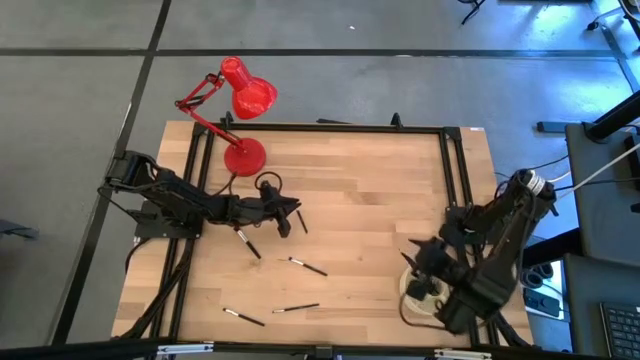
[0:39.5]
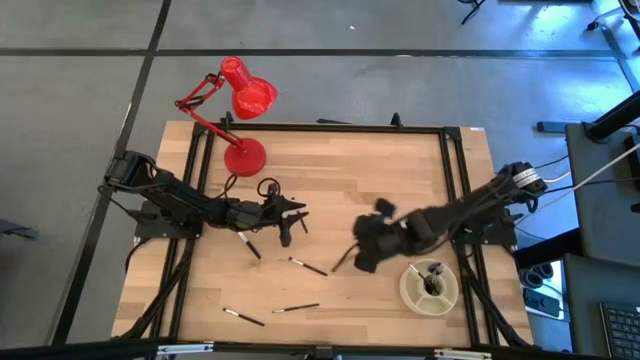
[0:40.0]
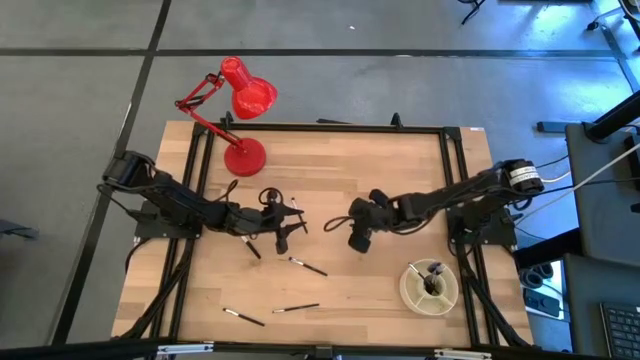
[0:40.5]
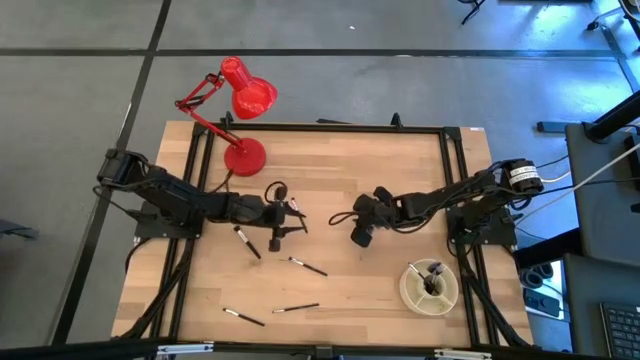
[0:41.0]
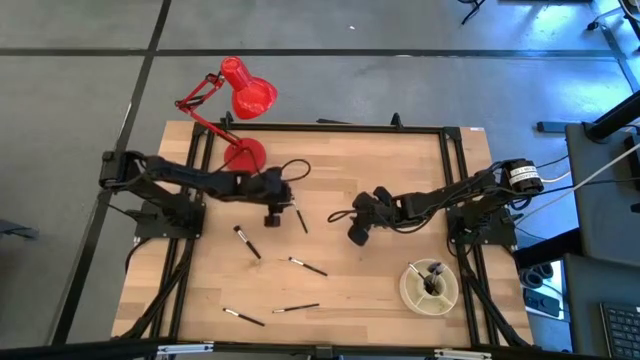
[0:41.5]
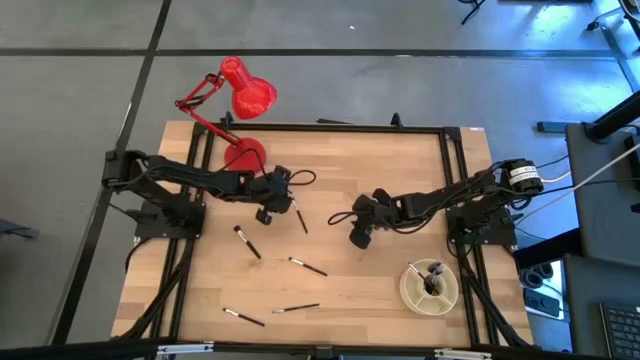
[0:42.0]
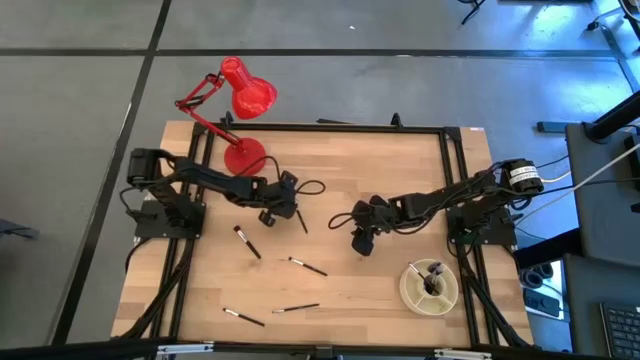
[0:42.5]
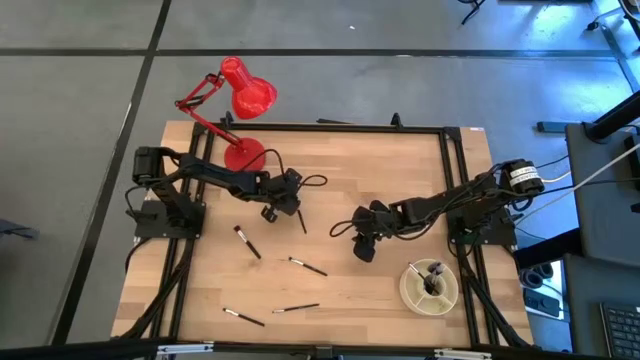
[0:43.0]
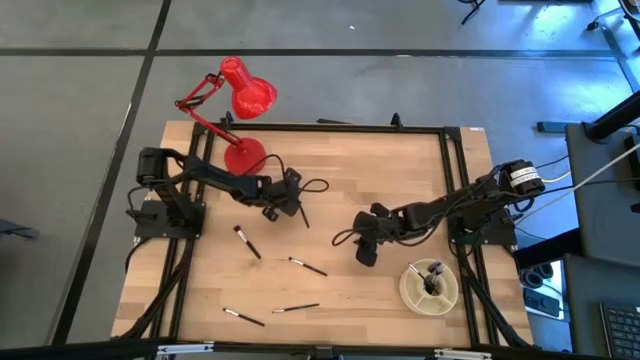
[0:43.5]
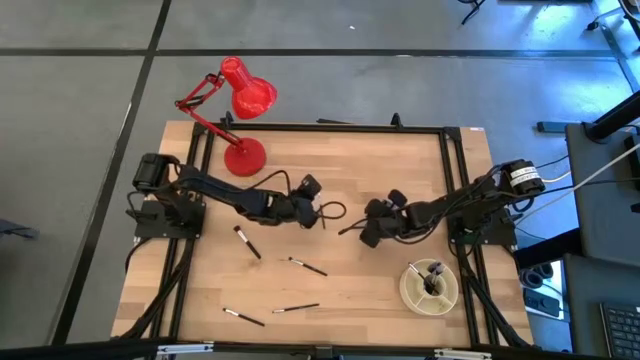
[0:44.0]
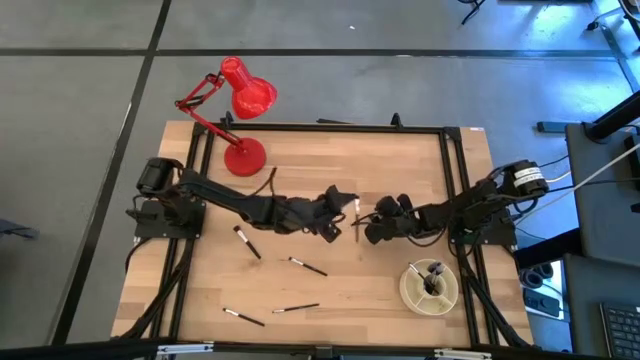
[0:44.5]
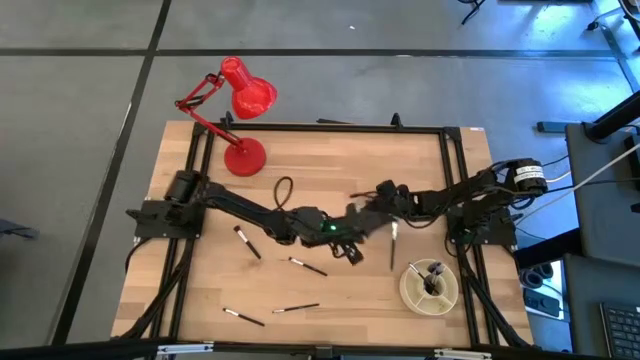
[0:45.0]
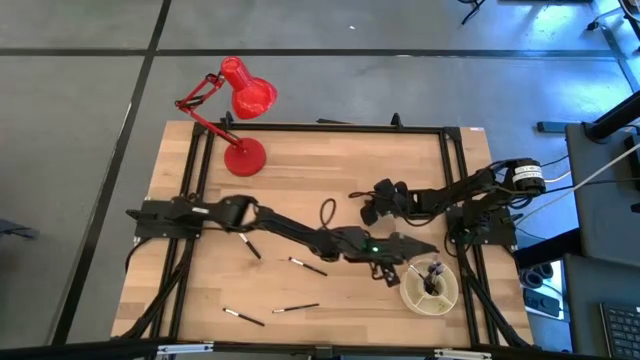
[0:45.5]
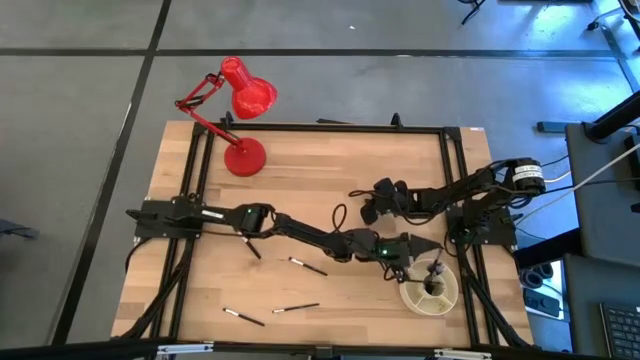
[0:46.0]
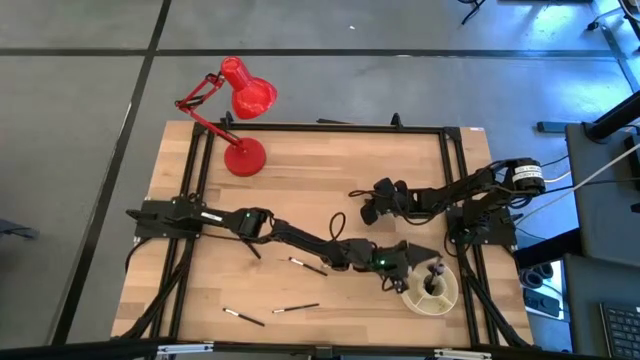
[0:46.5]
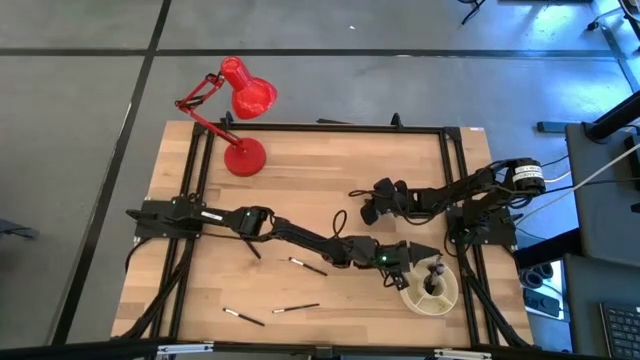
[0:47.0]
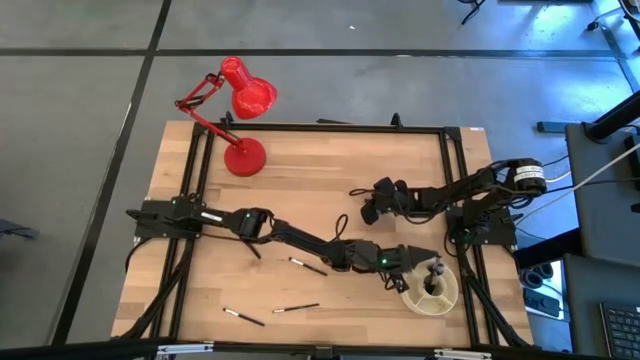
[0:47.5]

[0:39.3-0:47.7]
Task: Sort items
Put the eyeshadow brush into the brush organizer

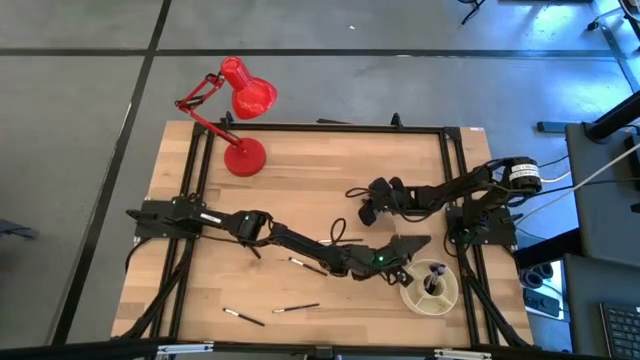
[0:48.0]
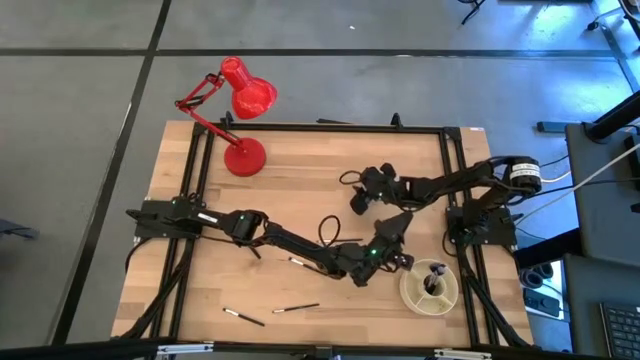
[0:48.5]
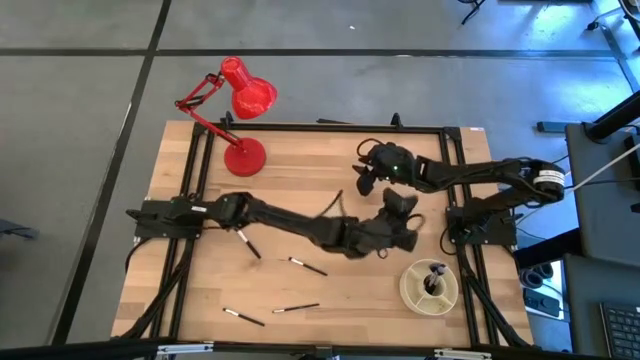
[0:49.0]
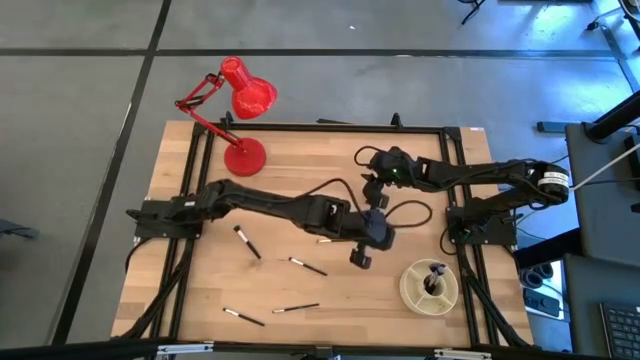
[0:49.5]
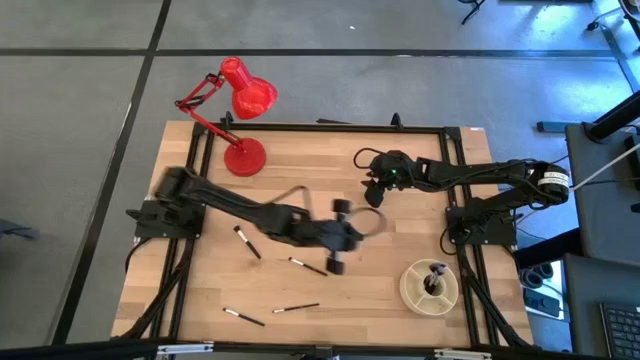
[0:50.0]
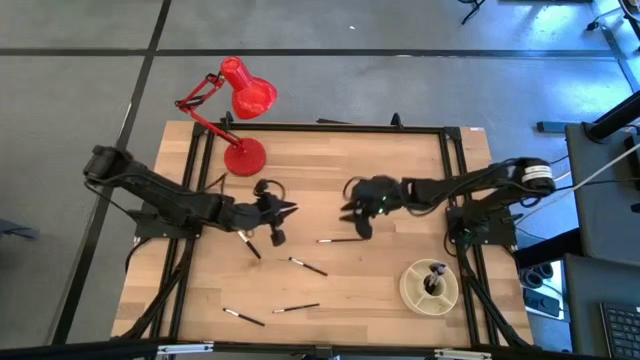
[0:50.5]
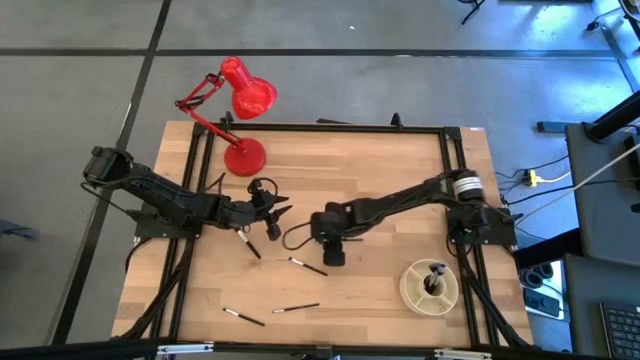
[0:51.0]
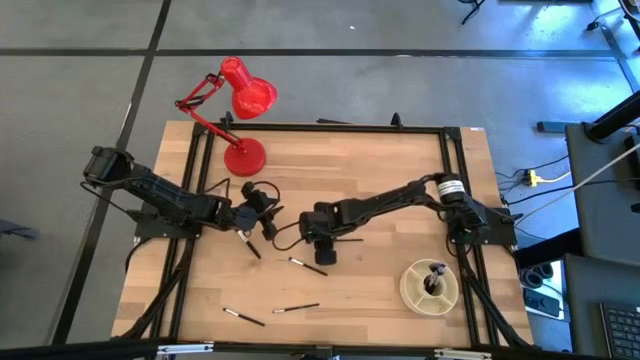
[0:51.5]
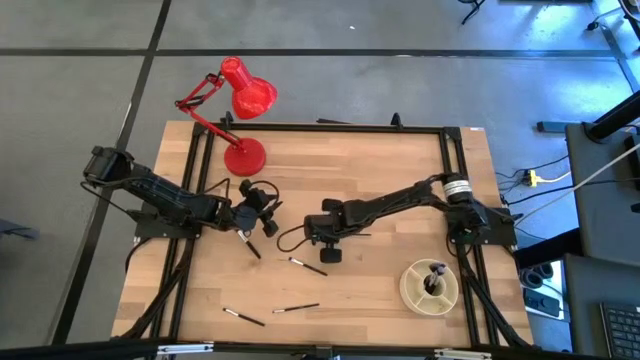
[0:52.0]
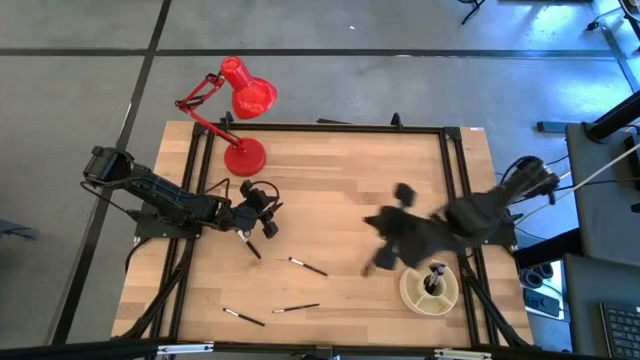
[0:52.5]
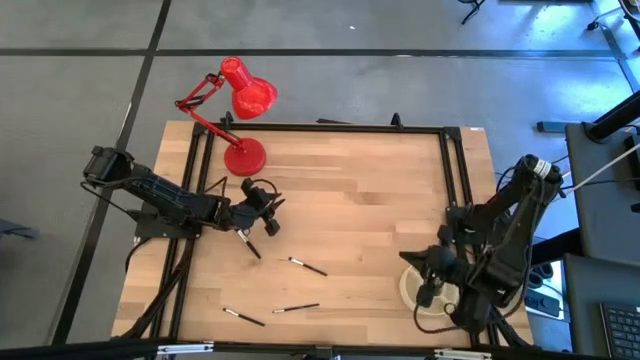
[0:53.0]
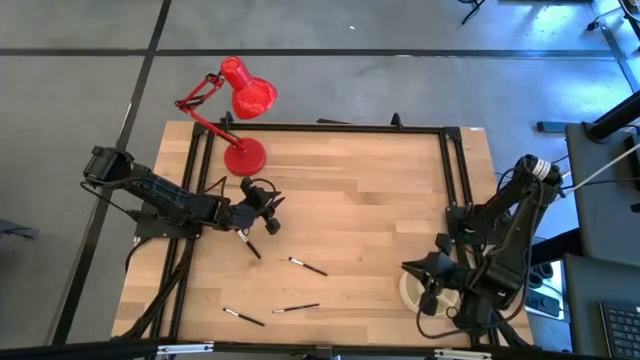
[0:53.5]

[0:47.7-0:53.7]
Adjust the eyeshadow brush into the brush organizer

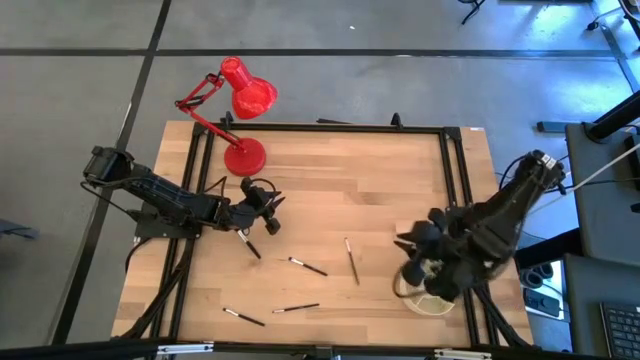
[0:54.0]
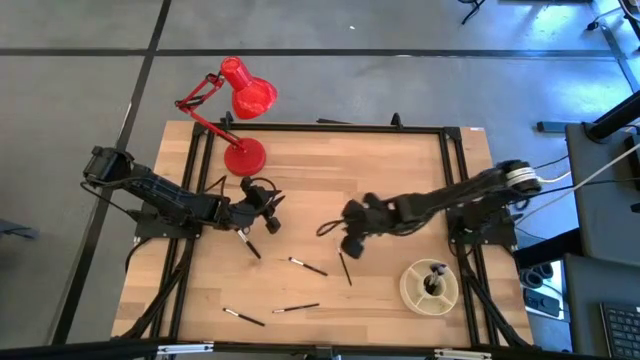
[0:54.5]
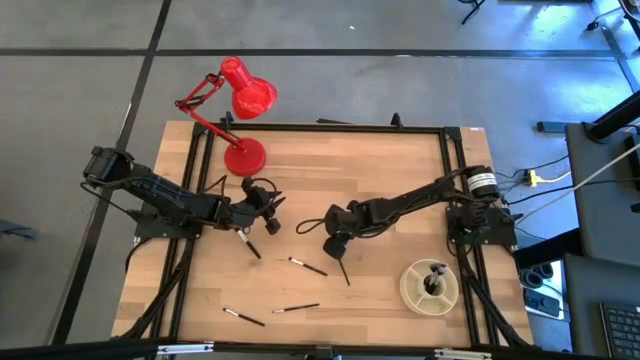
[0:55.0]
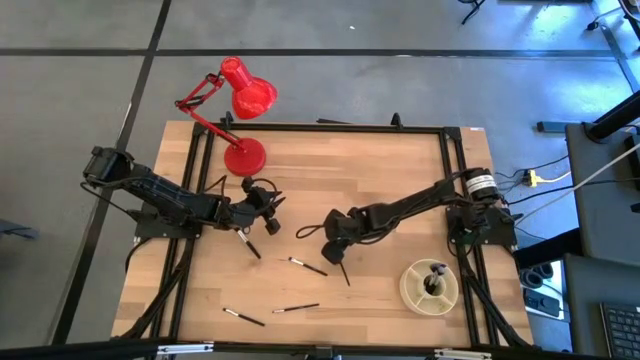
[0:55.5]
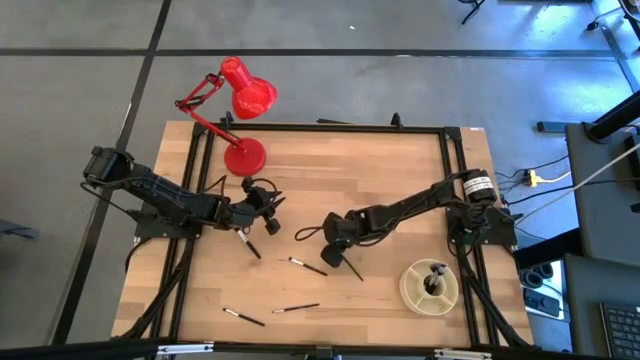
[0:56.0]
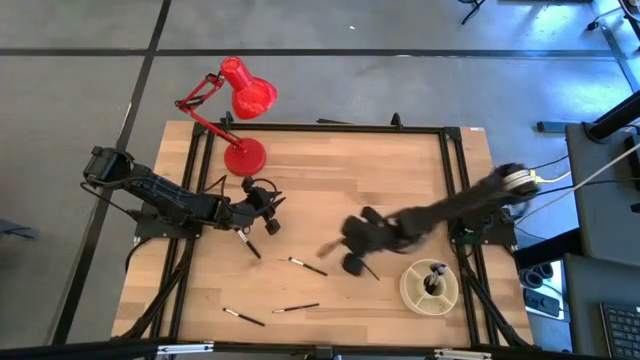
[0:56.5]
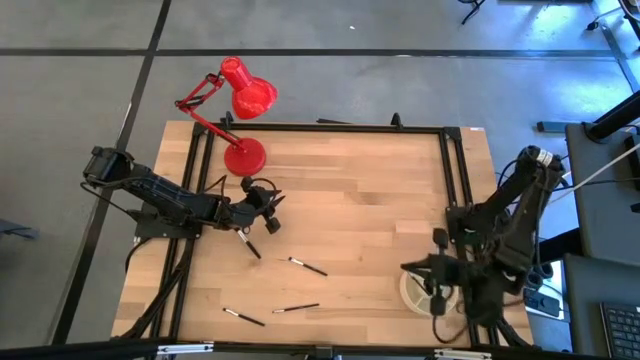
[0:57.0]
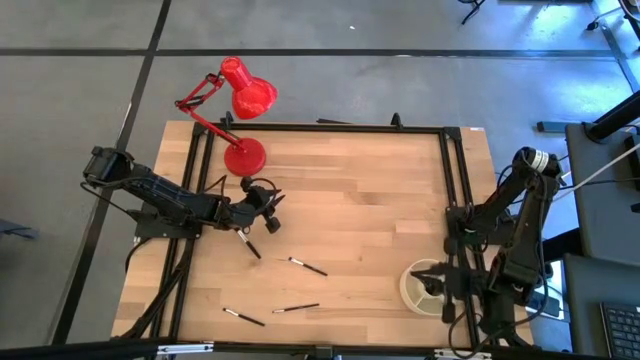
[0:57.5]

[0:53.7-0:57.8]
Adjust the eyeshadow brush into the brush organizer

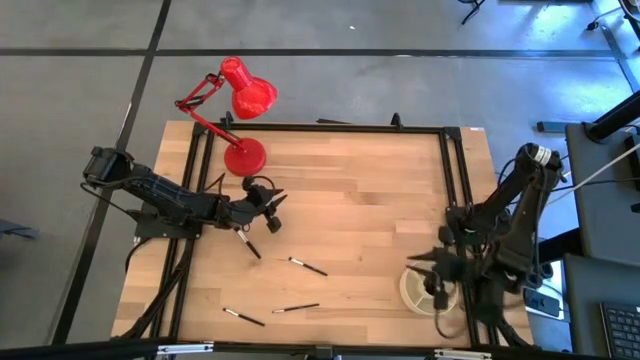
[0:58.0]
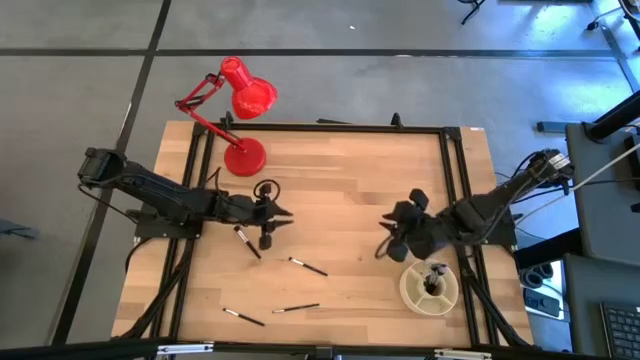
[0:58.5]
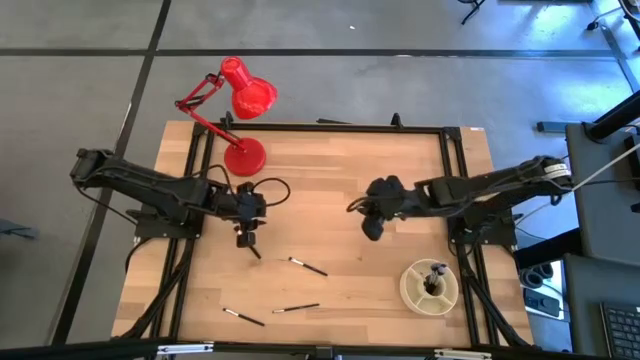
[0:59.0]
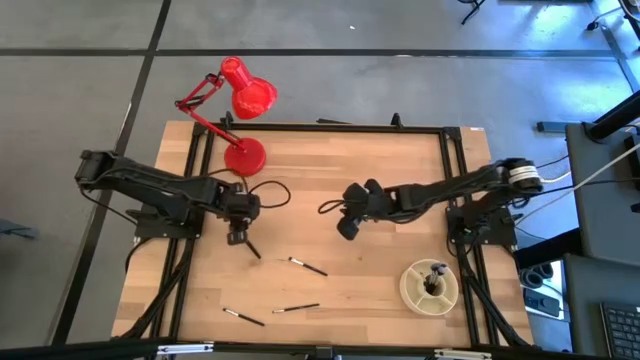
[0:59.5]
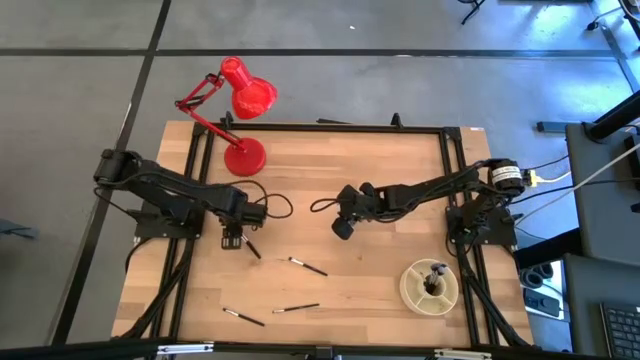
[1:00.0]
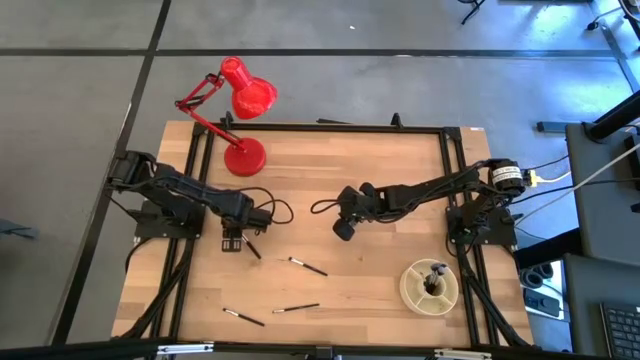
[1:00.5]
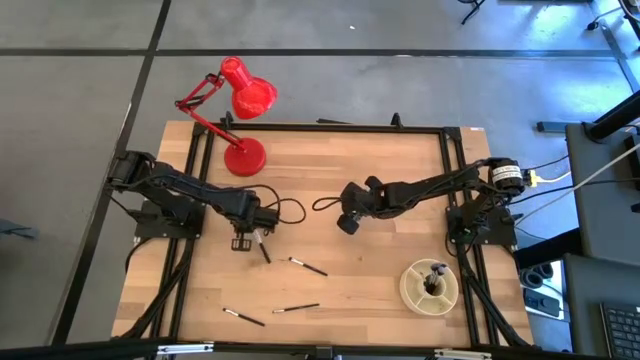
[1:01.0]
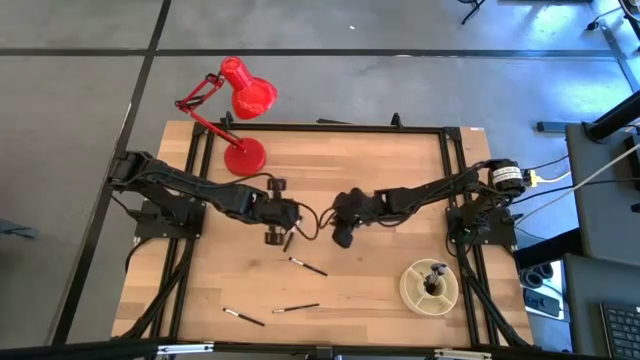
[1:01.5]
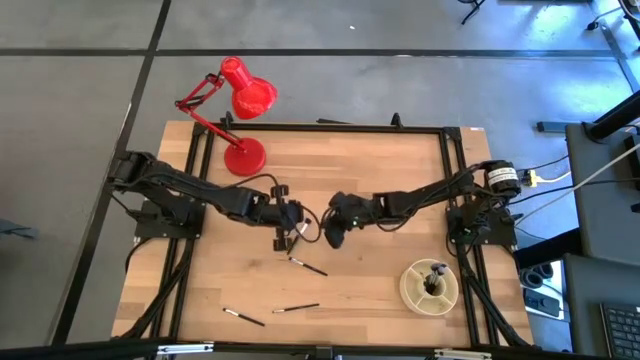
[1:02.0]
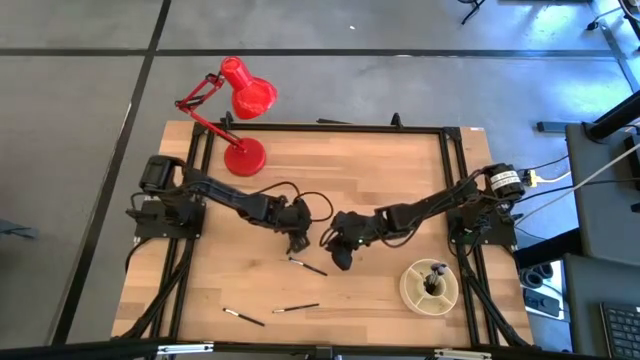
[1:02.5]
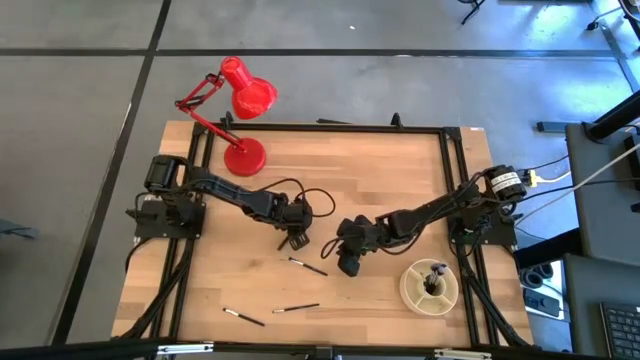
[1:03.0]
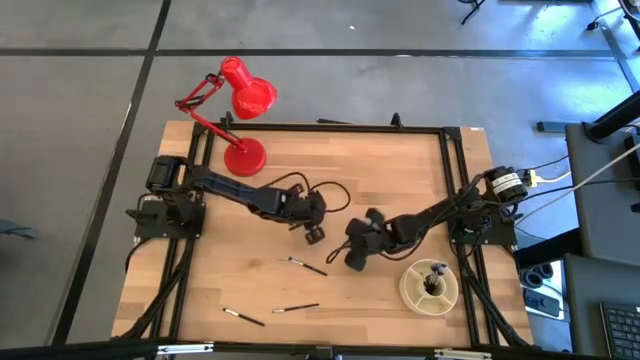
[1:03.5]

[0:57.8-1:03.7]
Put the powder brush into the brush organizer
